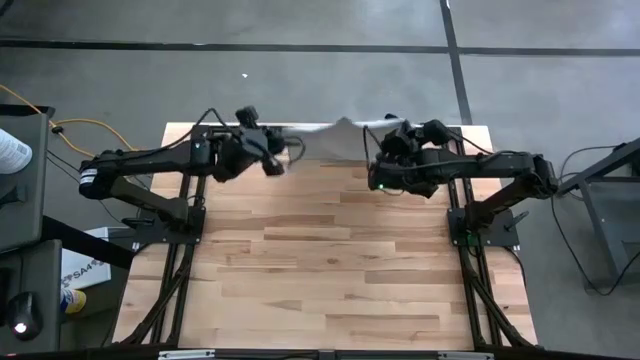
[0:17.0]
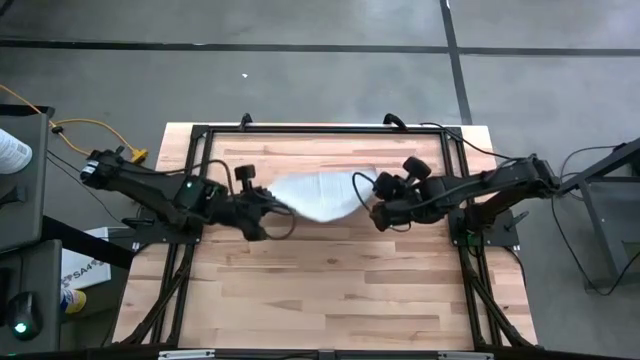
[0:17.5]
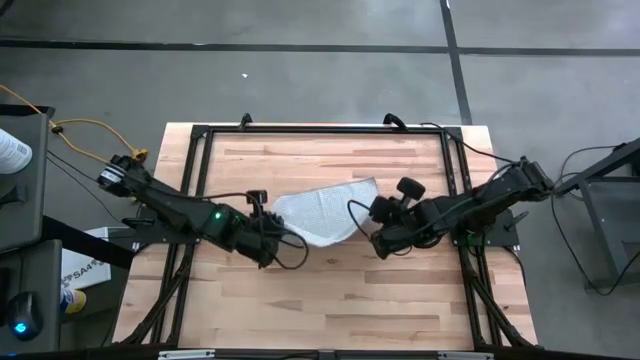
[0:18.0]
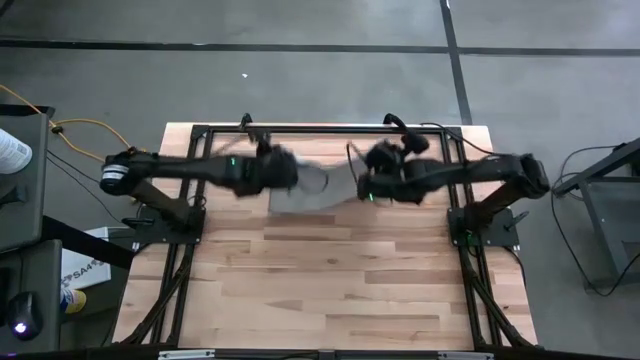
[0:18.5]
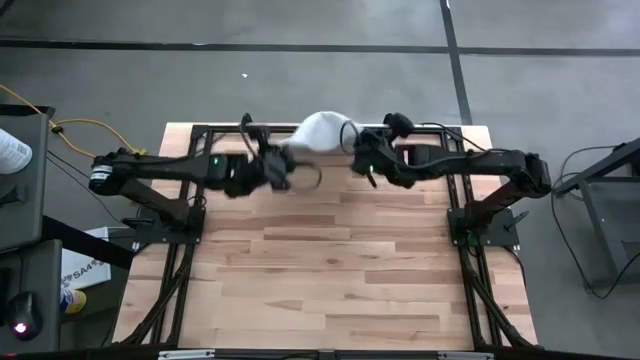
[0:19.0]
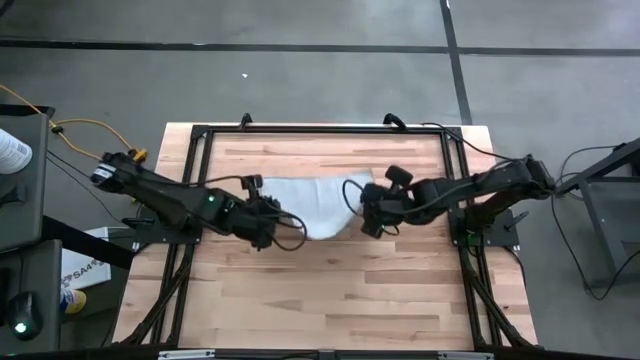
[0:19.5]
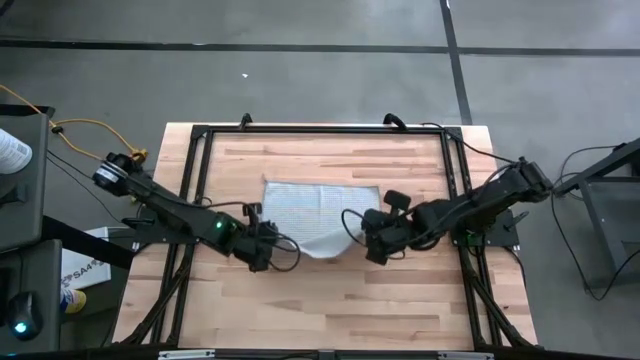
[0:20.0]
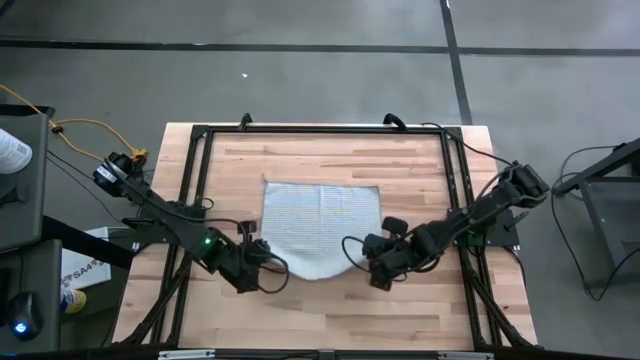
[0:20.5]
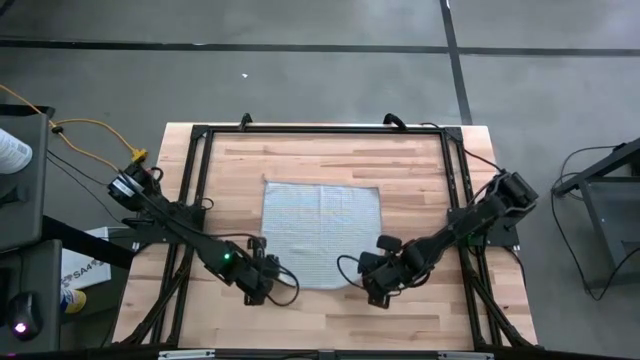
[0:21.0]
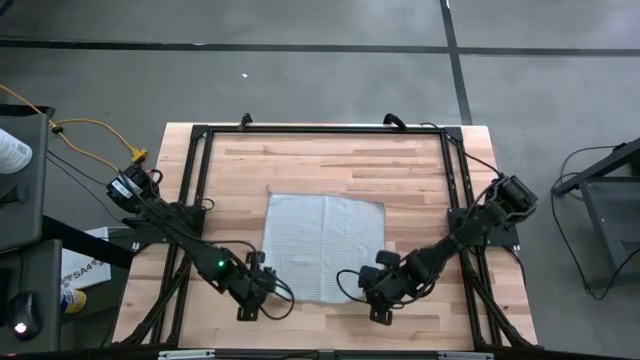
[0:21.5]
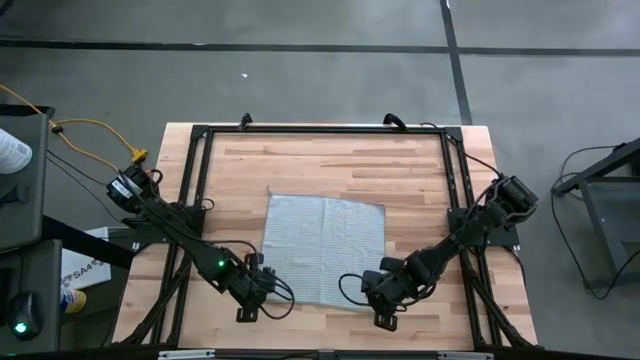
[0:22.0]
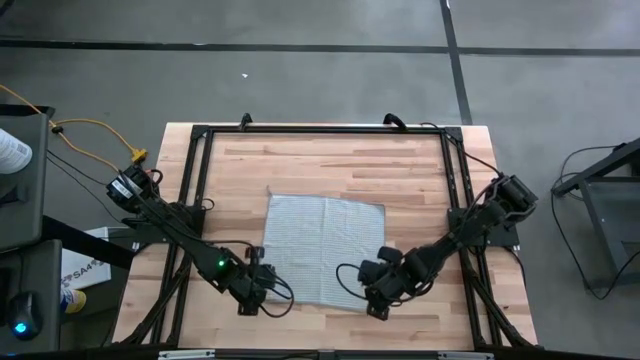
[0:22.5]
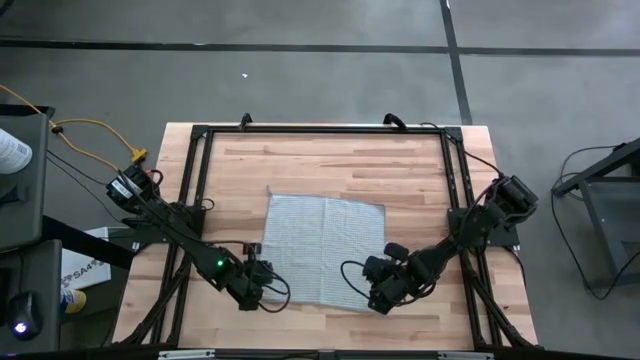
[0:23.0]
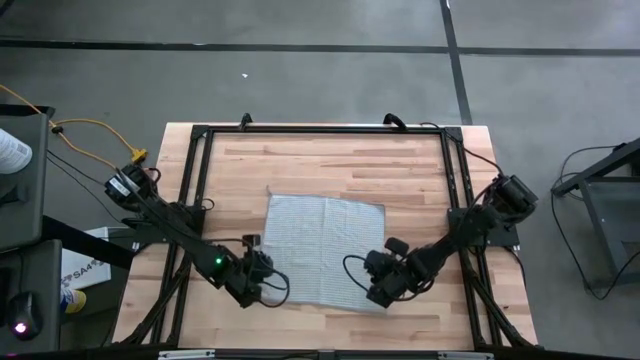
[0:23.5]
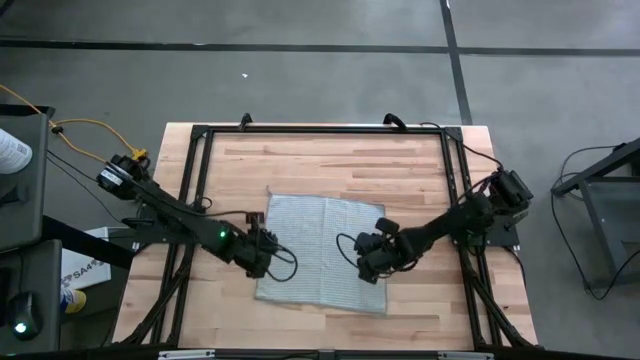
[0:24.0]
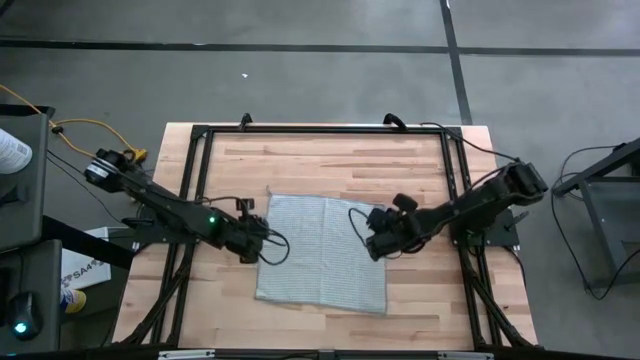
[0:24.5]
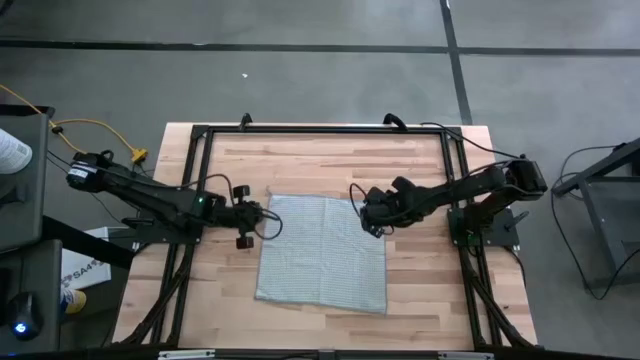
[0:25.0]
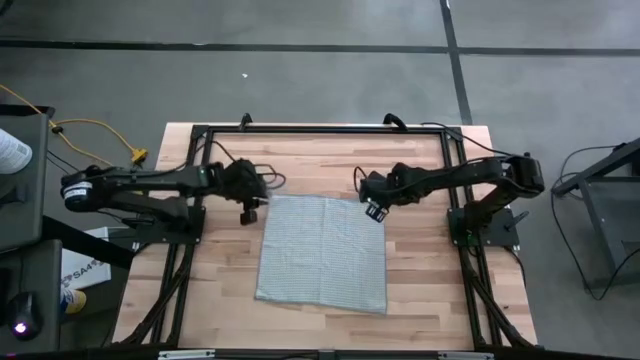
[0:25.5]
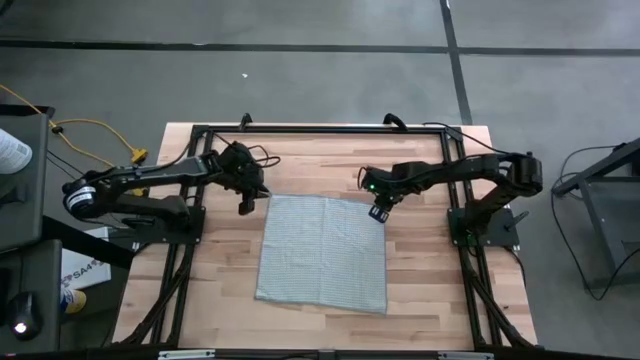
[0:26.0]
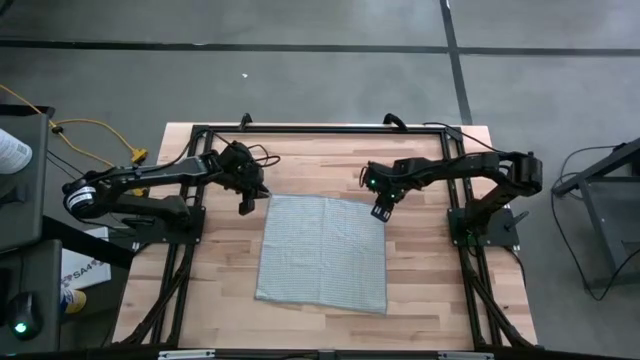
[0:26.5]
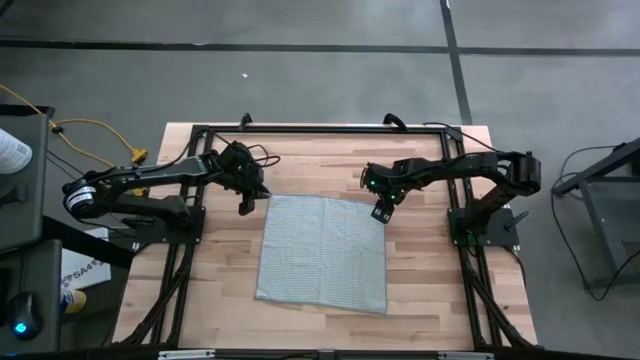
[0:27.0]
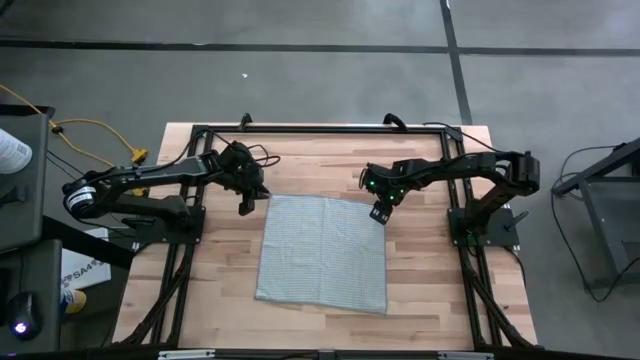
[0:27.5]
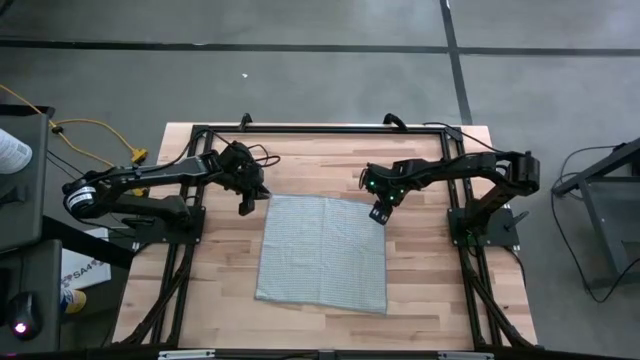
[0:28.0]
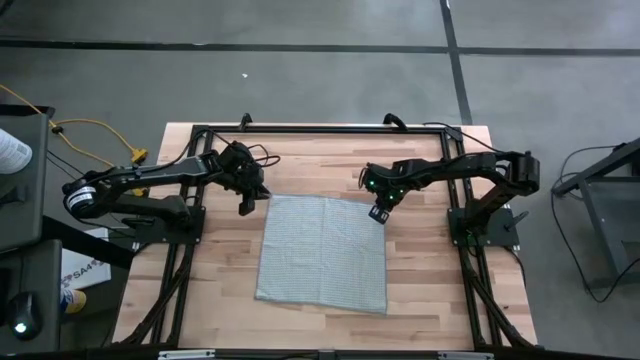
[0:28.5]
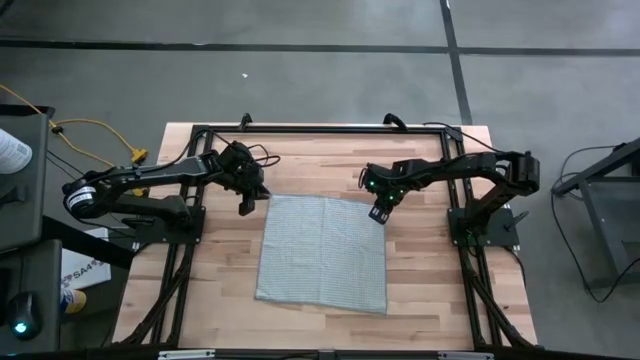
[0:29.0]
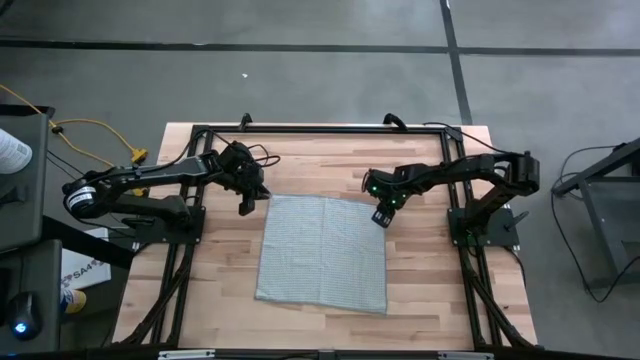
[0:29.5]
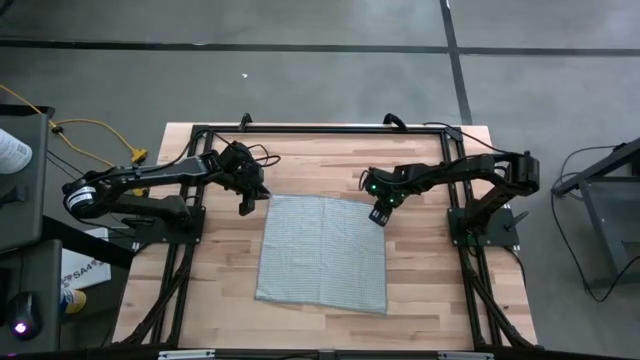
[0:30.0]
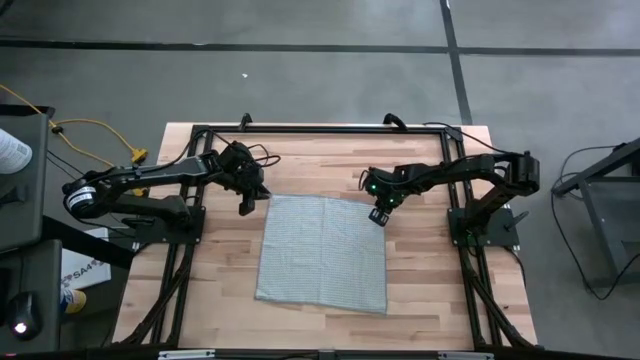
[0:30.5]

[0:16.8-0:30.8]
Task: Fold microfiber towels
Fold the gray microfiber cloth

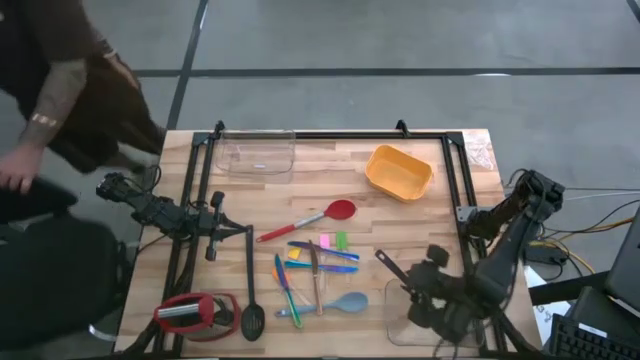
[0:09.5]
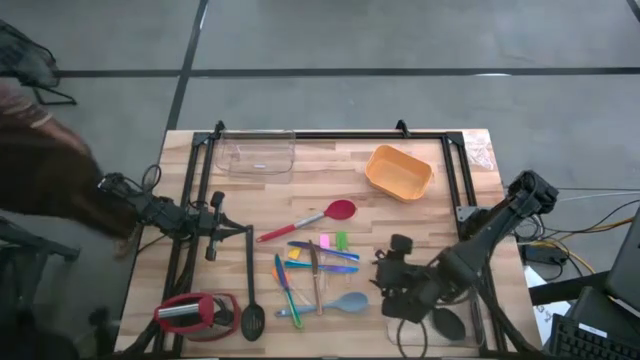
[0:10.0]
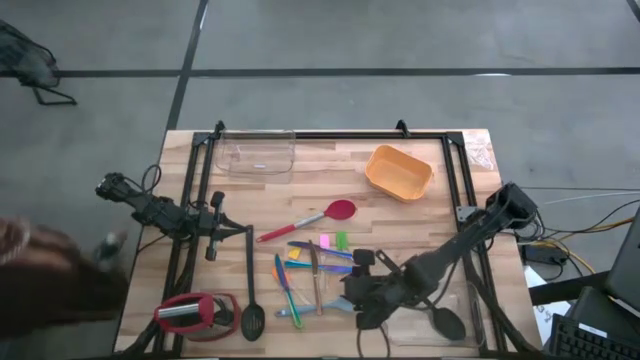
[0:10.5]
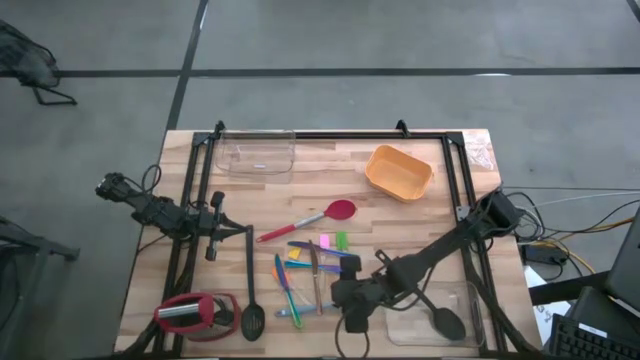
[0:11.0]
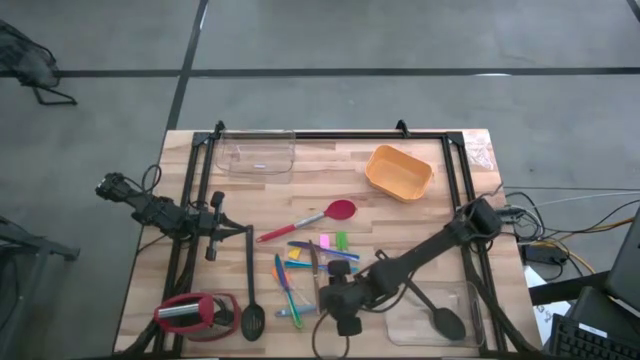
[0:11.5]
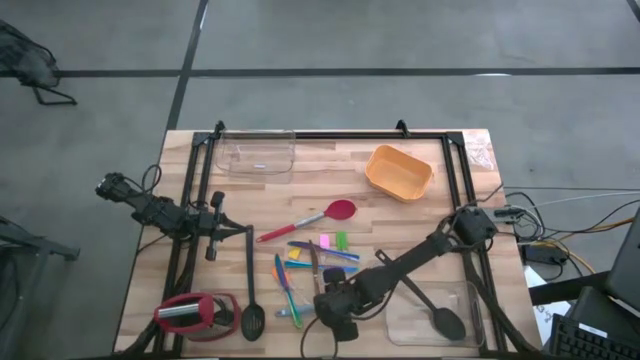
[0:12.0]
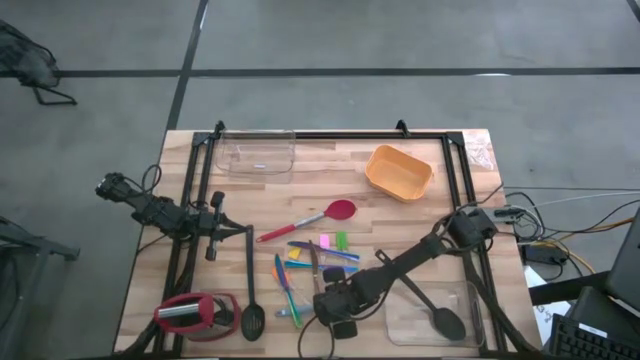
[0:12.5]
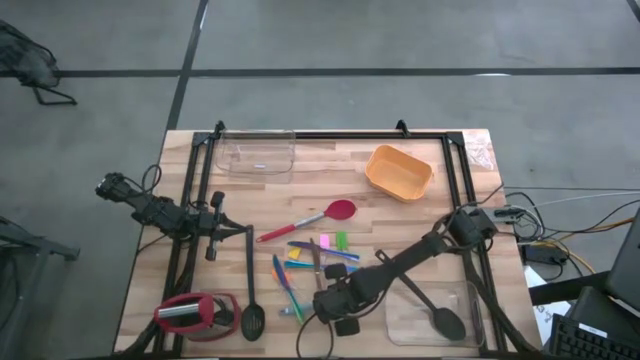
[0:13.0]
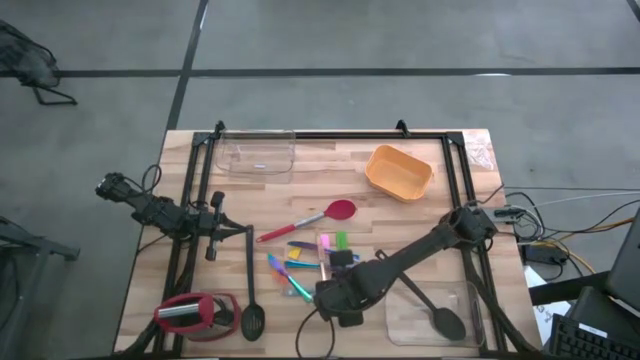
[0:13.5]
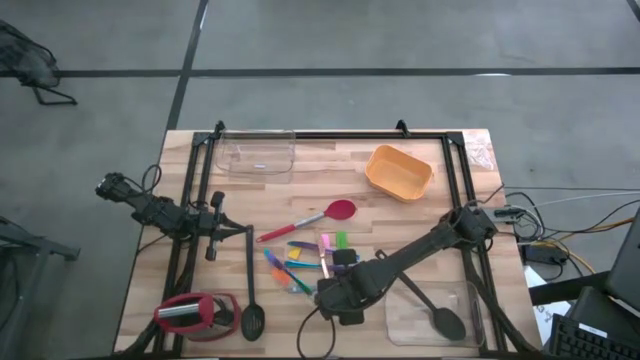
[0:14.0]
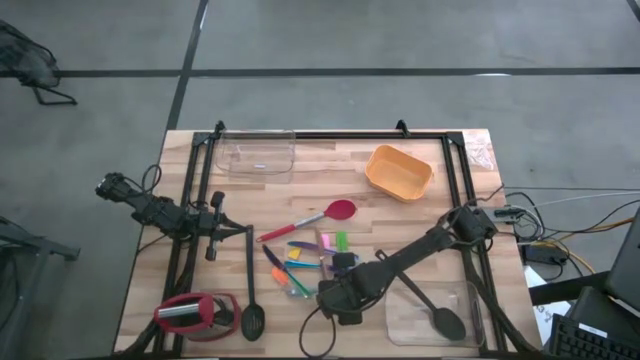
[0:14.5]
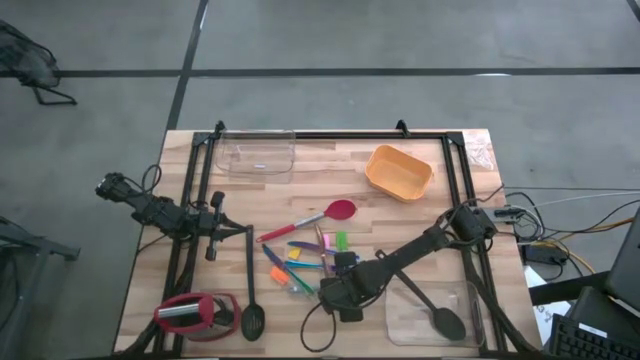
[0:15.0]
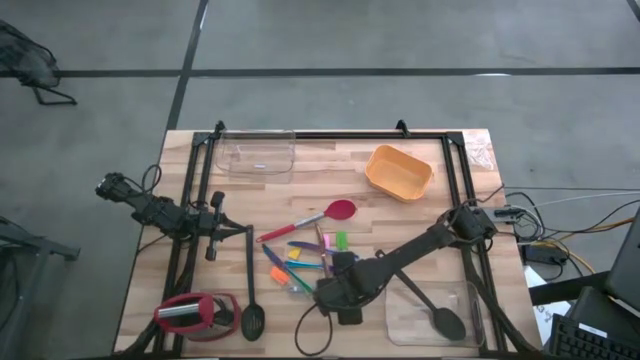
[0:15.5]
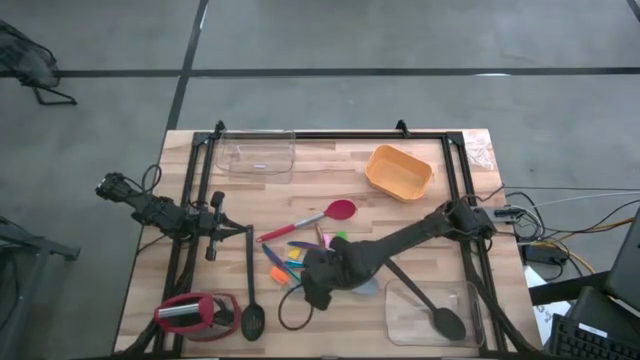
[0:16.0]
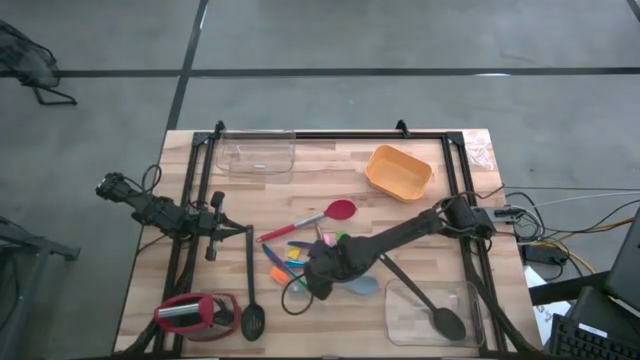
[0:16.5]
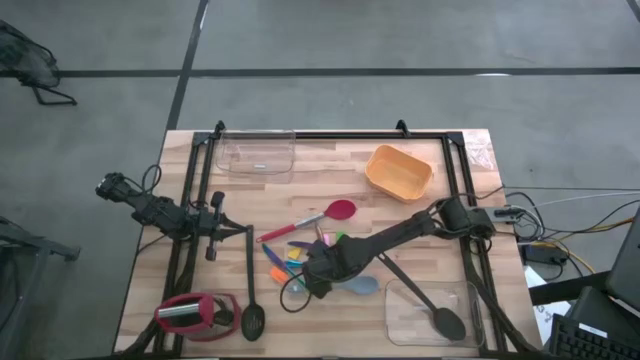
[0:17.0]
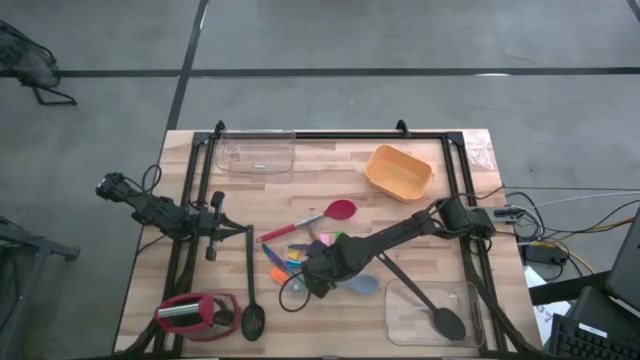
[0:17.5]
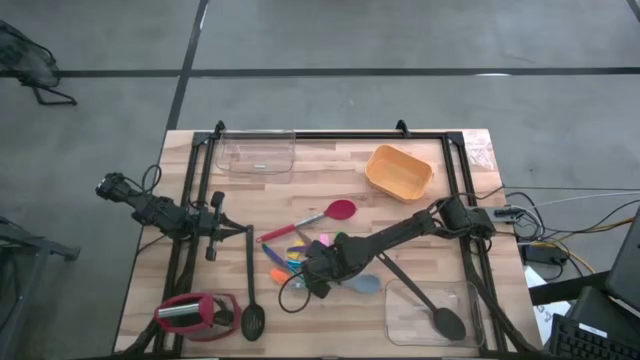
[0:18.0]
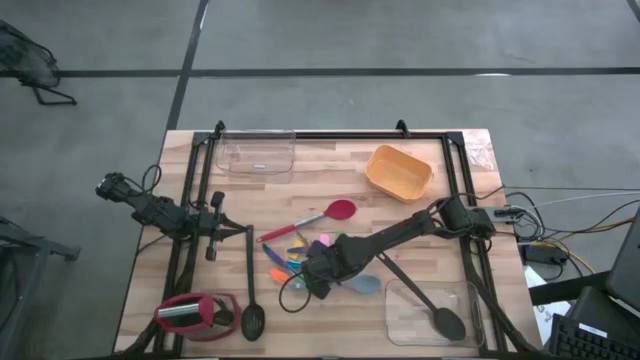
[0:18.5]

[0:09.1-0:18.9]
Task: Pick & Place Kitchen Items
Put the yellow knife into the yellow bin
